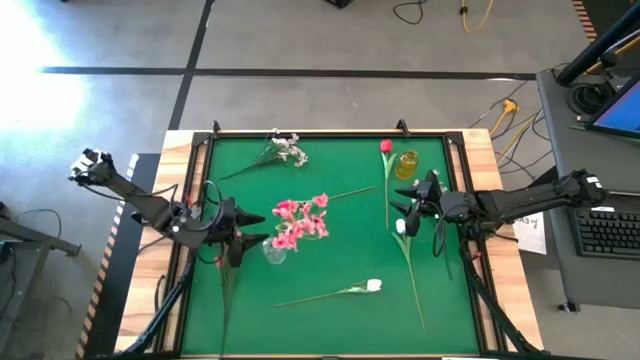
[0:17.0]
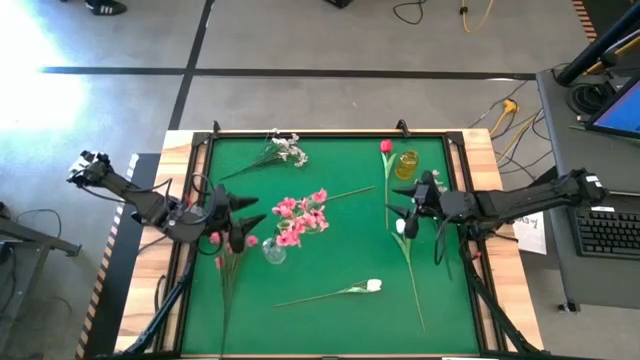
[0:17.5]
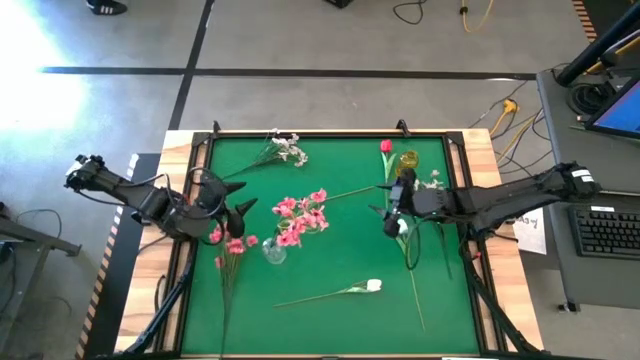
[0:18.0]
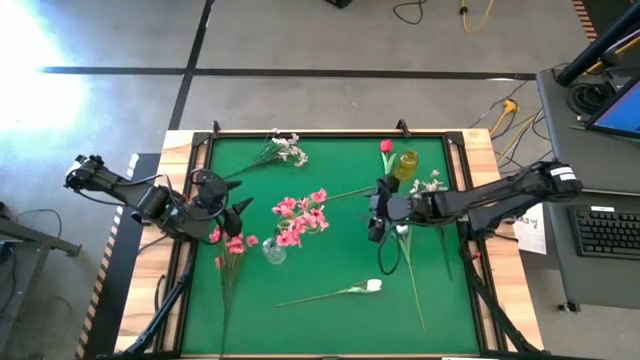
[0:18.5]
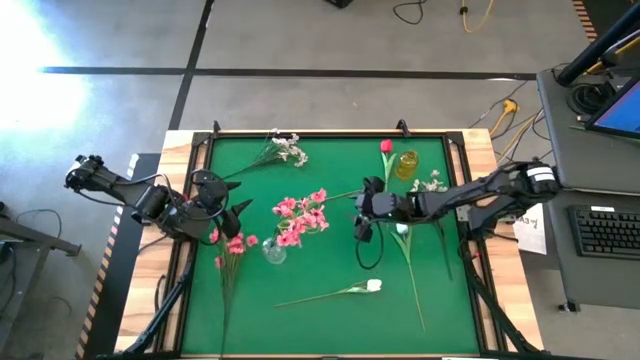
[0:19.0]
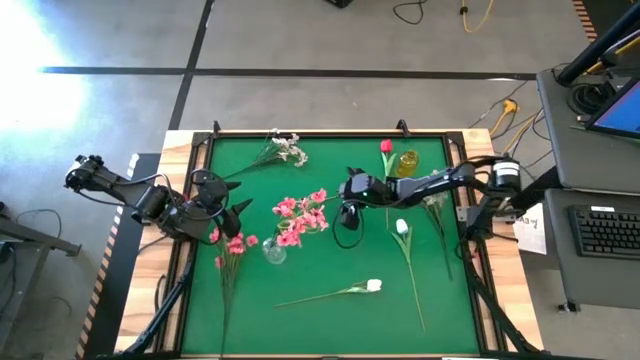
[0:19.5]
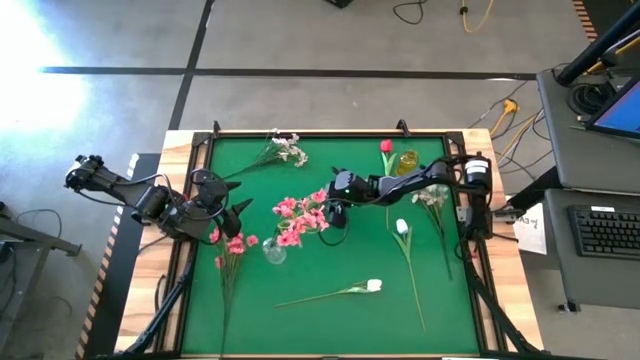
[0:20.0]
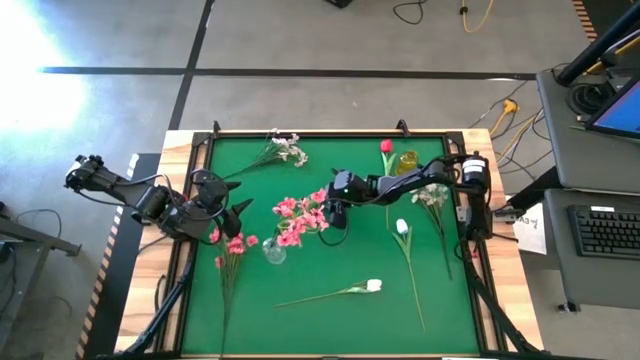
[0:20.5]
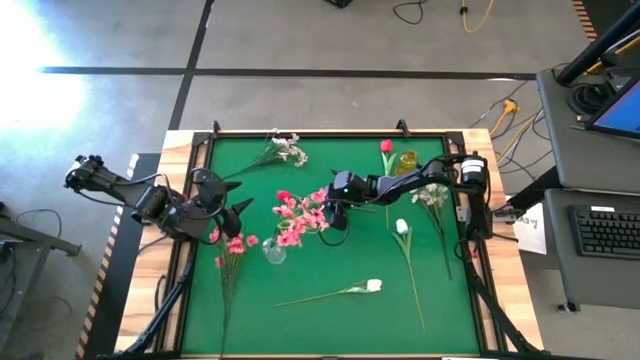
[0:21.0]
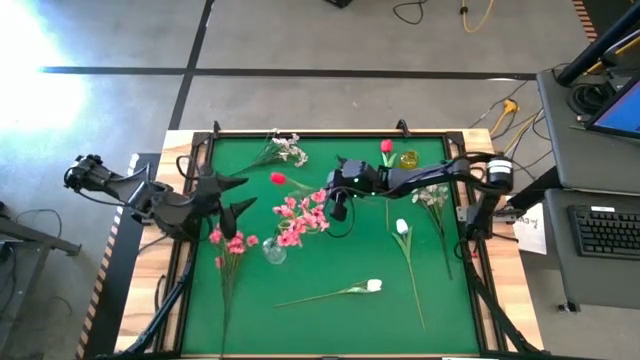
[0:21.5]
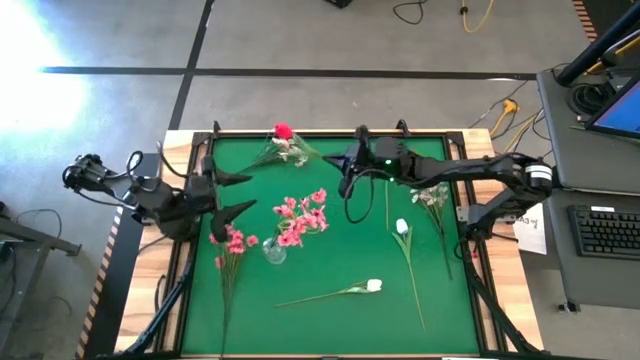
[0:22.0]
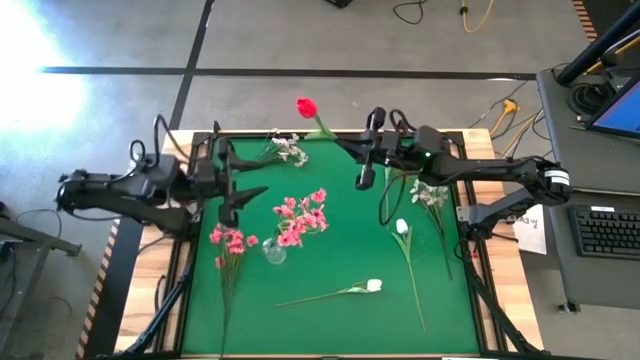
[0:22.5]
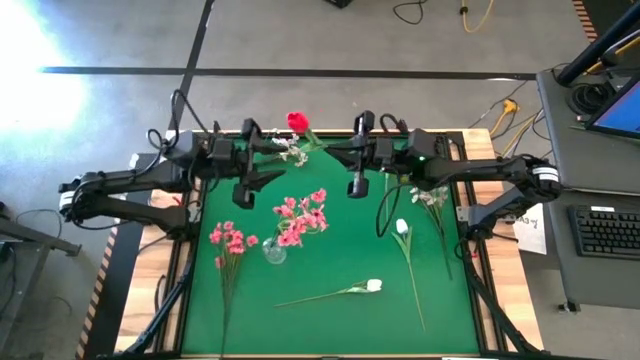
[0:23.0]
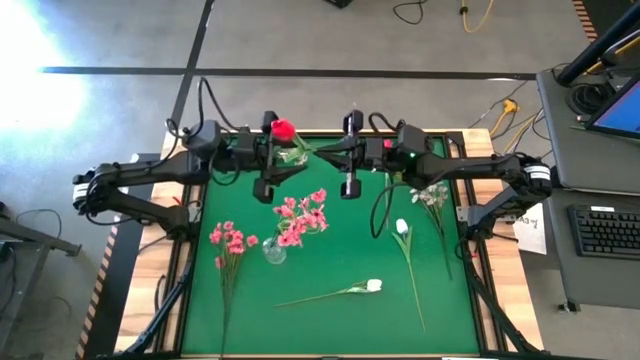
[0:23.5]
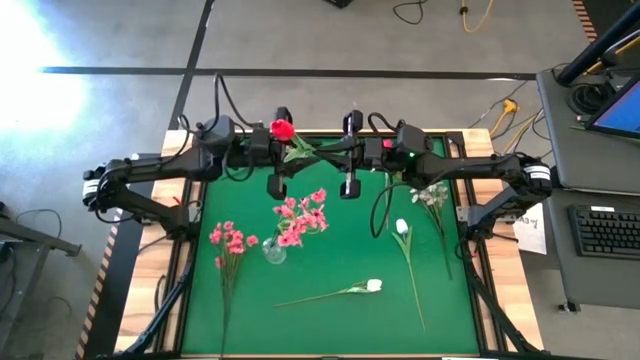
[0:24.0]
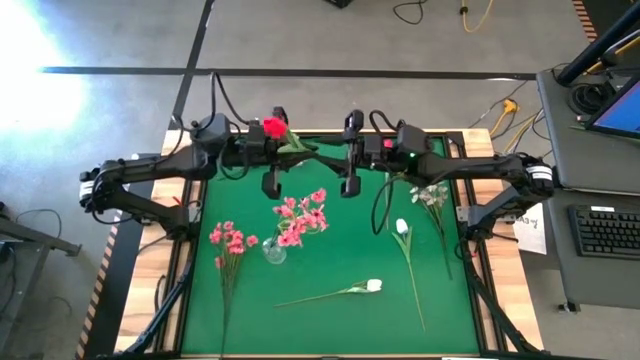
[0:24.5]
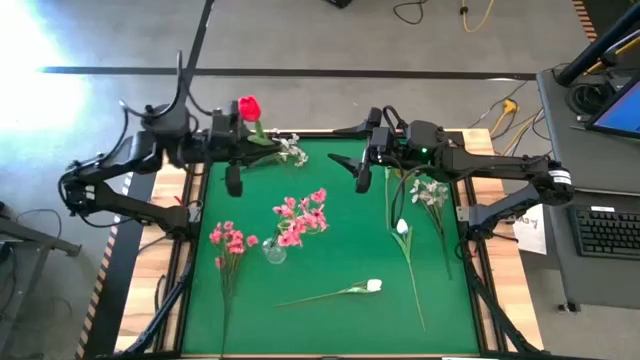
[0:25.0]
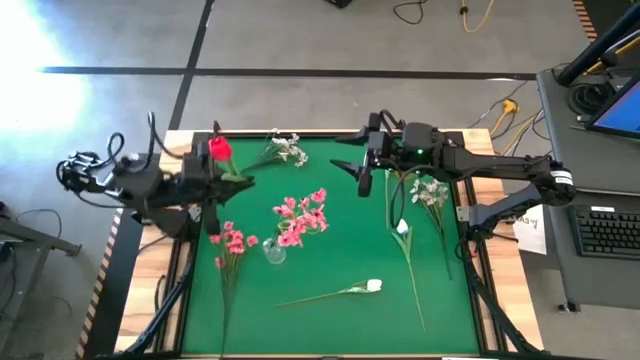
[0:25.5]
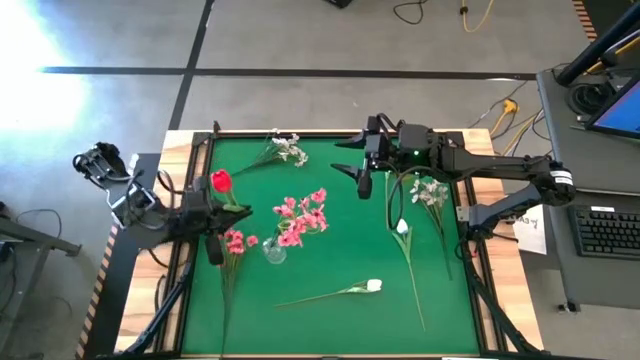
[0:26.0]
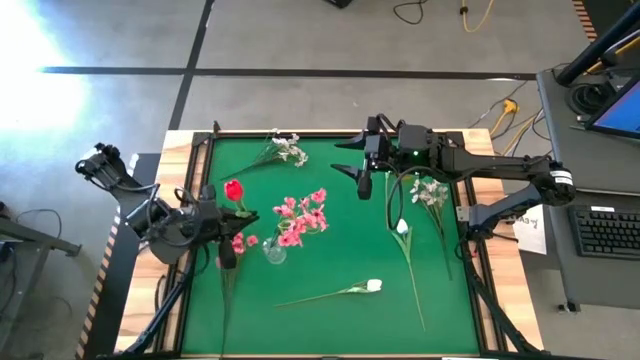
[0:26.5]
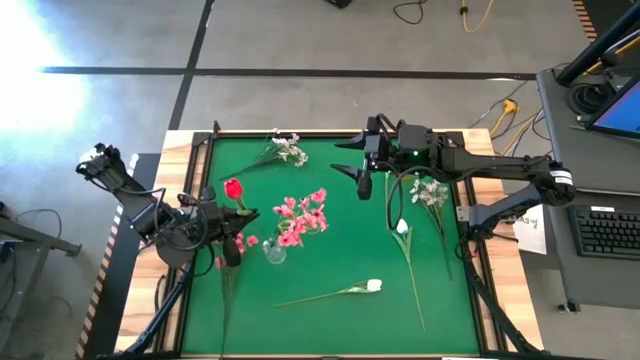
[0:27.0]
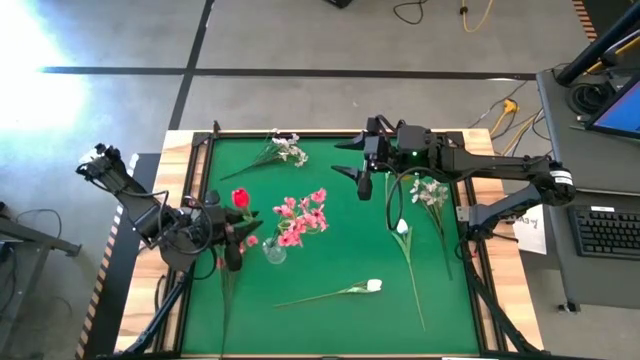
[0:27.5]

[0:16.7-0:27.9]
Task: Sort flowers into vase by color
Put the left red flowers into the transparent vase

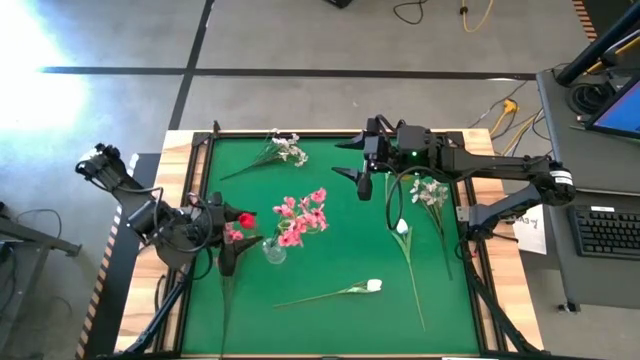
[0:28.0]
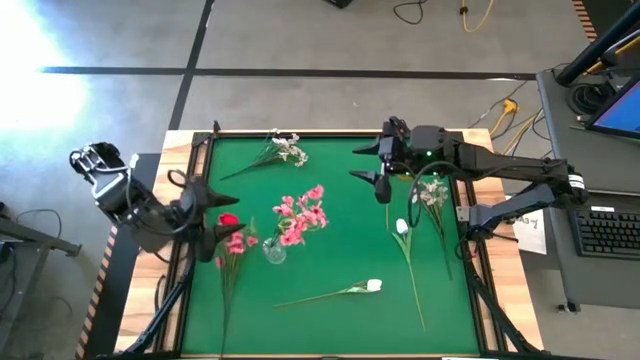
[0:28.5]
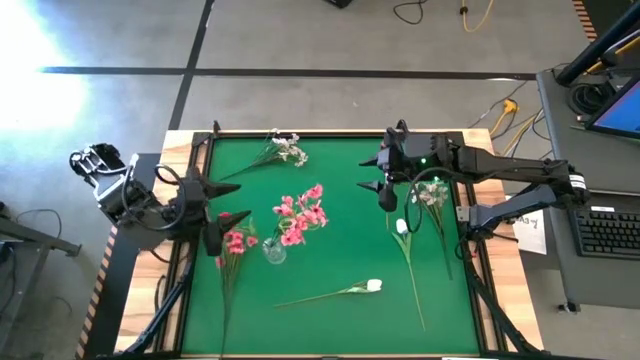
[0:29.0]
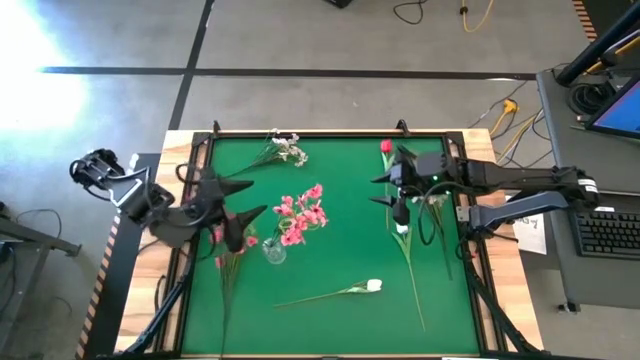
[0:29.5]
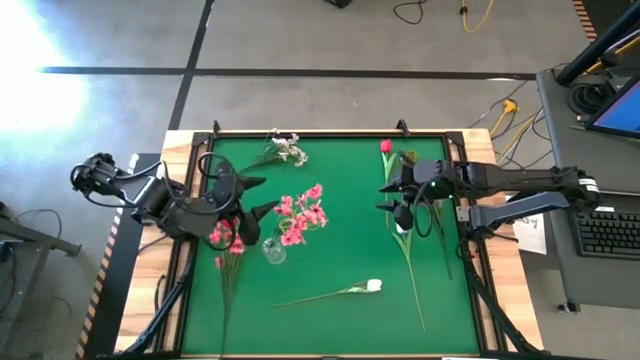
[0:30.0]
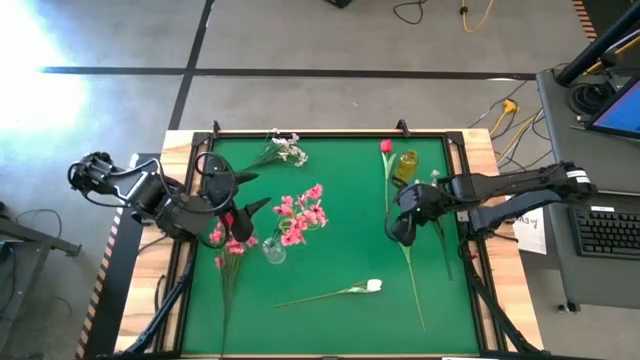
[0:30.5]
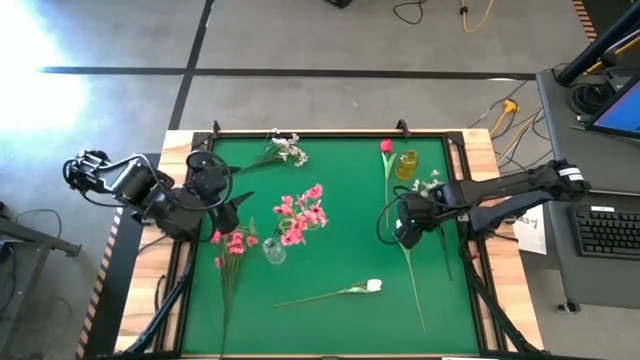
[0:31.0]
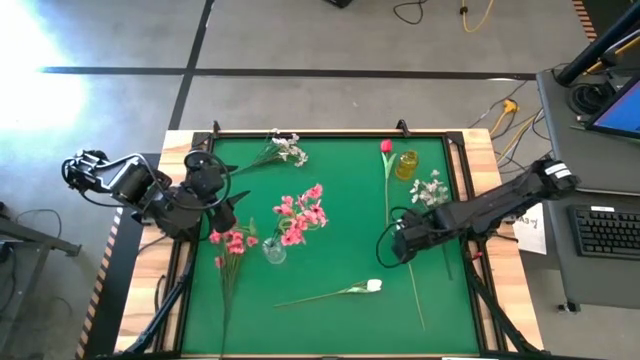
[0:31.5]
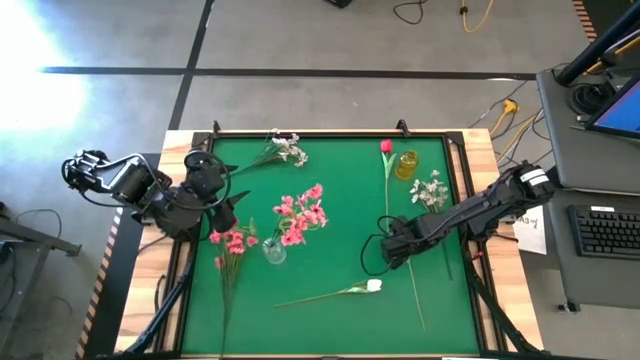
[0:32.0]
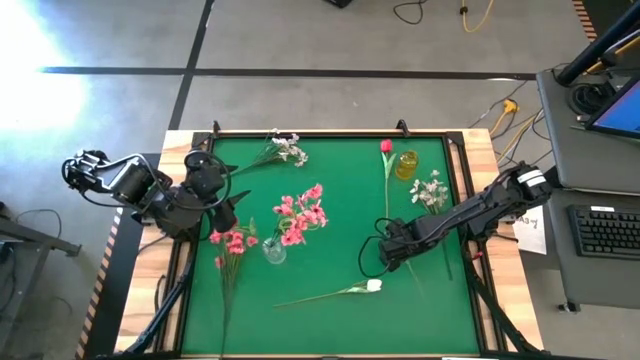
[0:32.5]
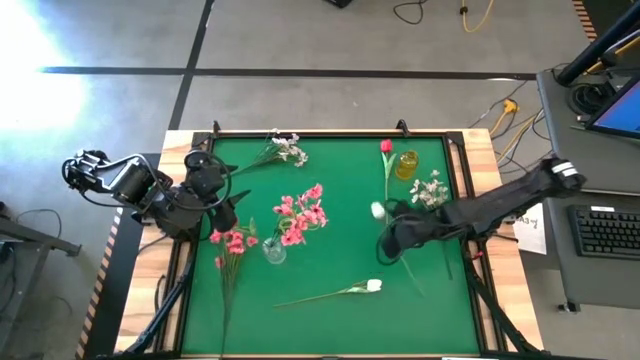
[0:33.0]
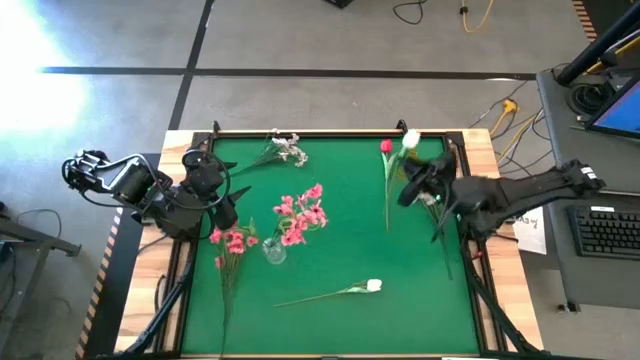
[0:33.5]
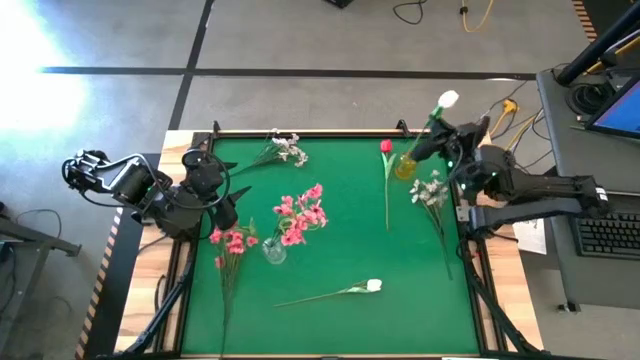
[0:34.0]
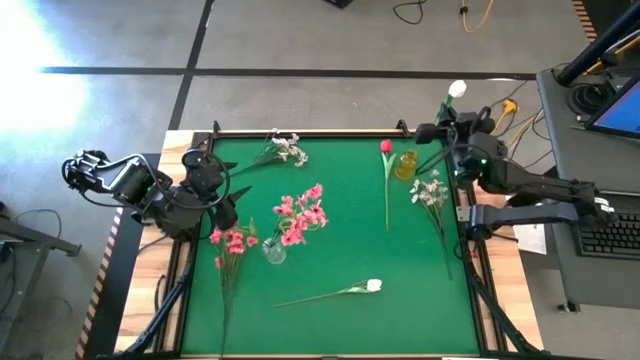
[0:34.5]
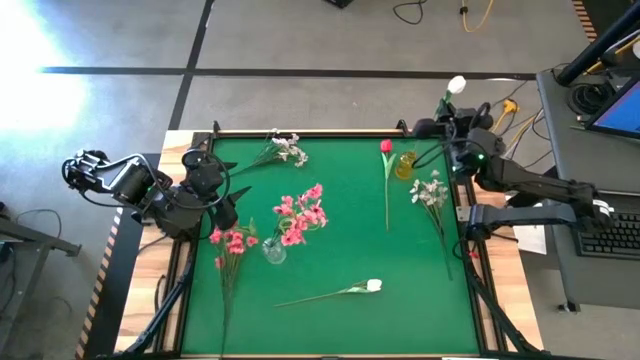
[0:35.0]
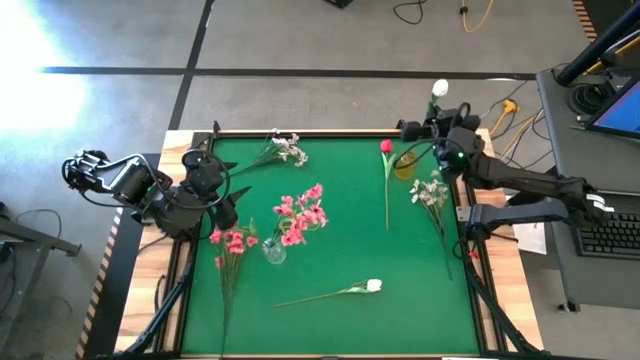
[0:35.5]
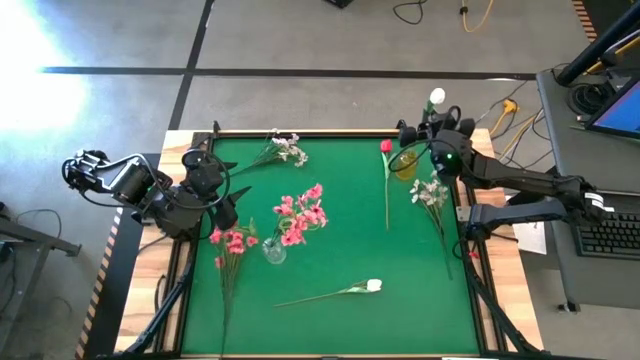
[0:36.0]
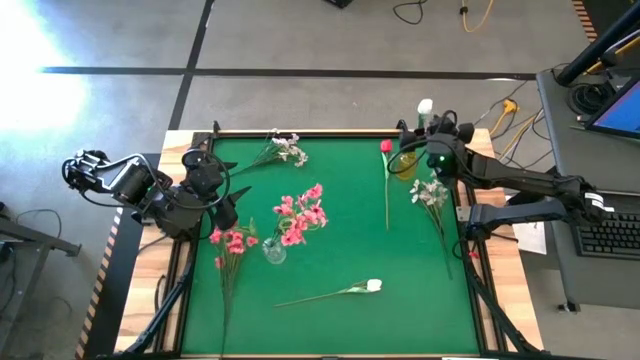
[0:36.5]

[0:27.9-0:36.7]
Put the right white flowers into the yellow vase

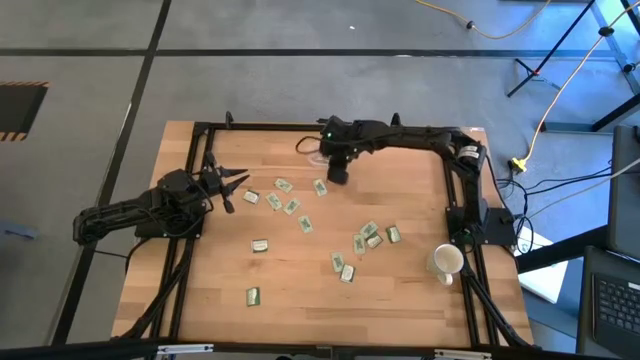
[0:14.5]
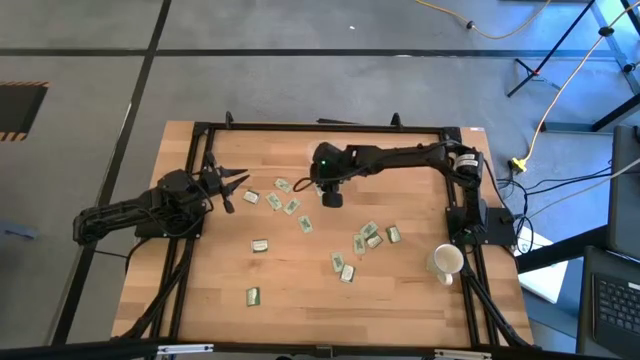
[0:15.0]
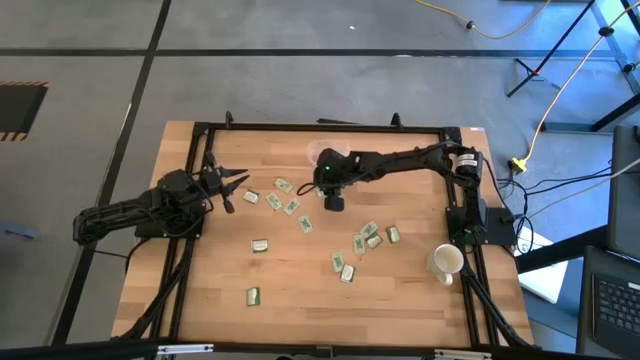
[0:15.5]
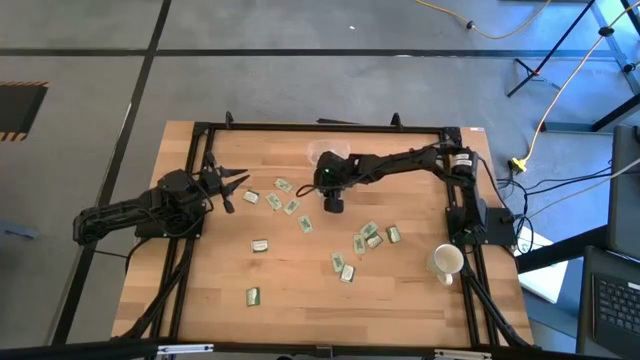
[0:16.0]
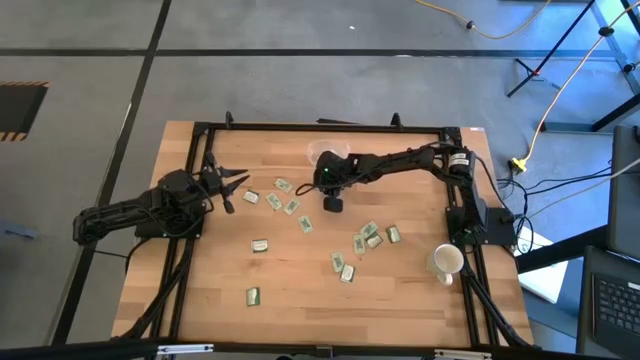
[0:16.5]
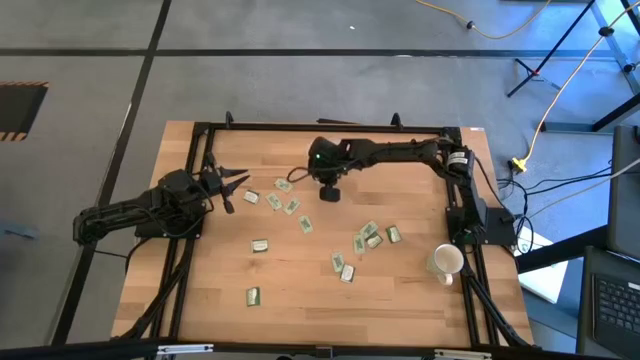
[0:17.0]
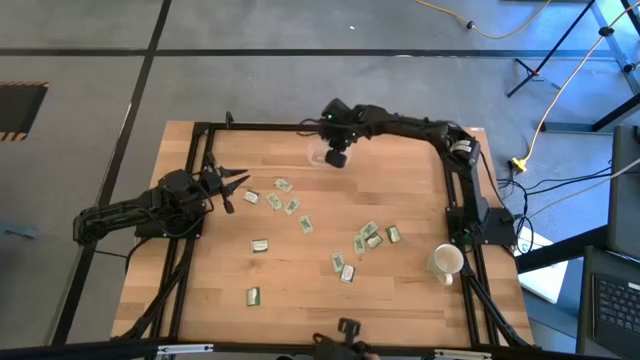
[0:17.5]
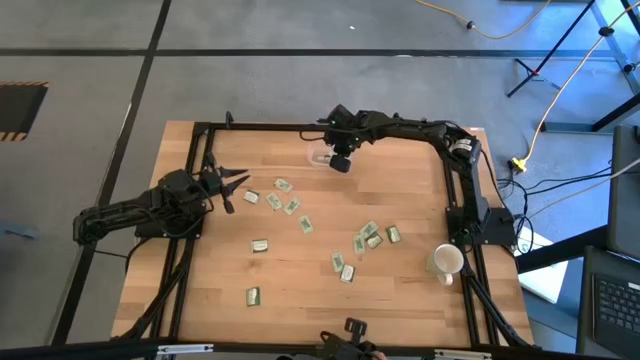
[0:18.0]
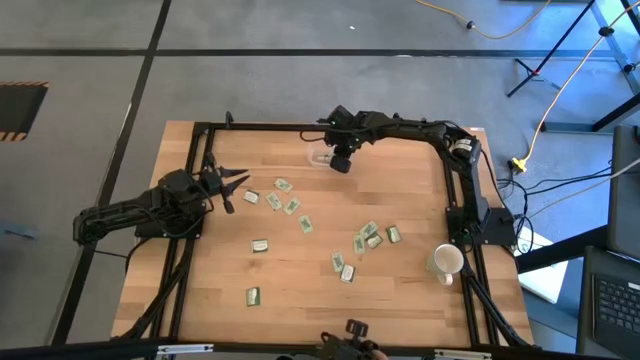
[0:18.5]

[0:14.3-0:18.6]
Task: Pick and place items into bin
Put the white stevia packet into the transparent bin
